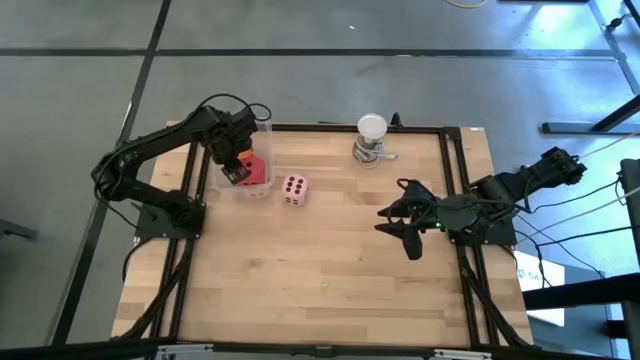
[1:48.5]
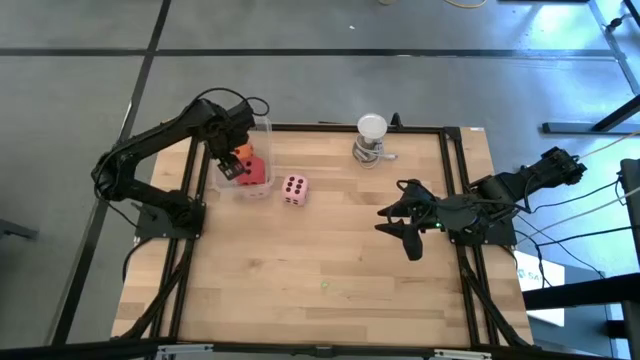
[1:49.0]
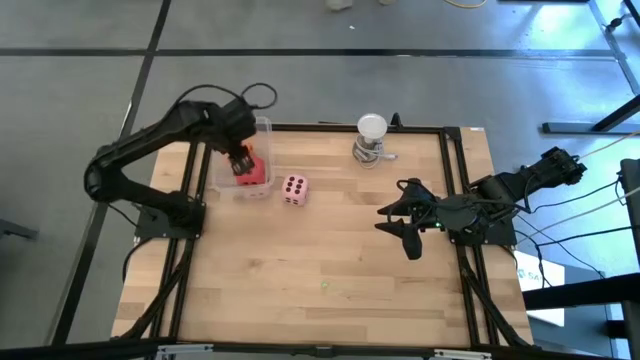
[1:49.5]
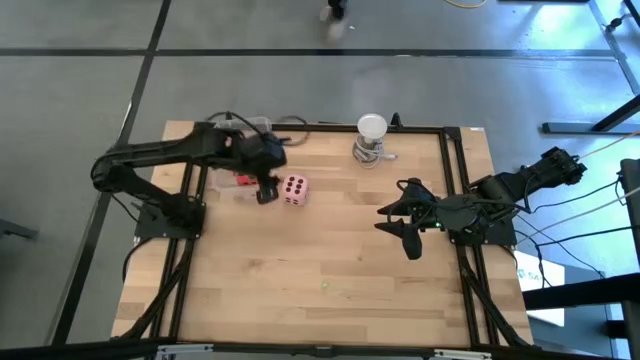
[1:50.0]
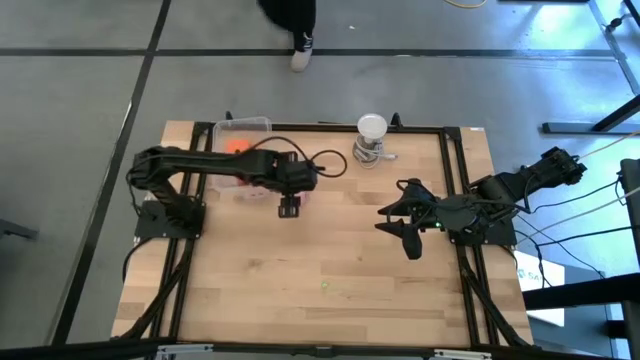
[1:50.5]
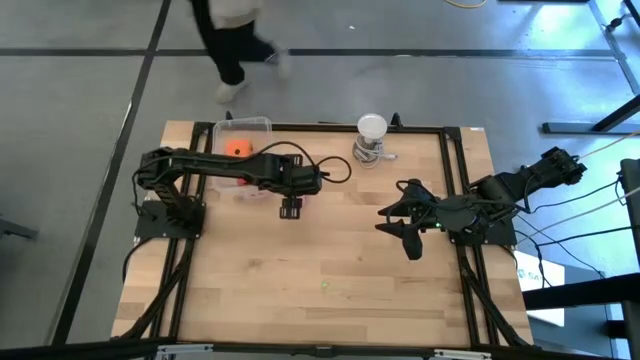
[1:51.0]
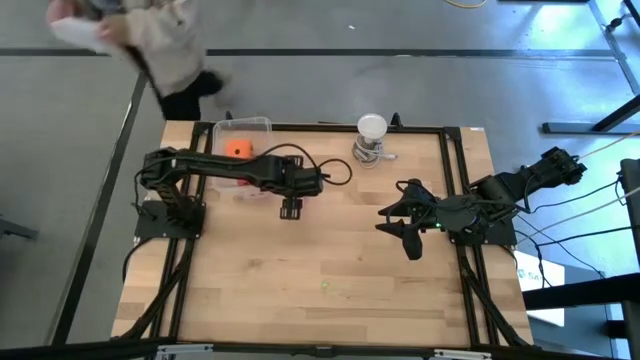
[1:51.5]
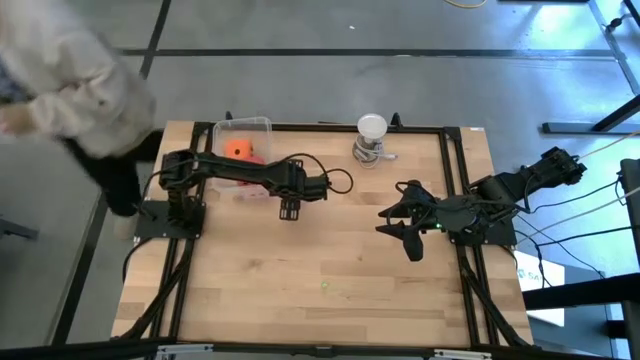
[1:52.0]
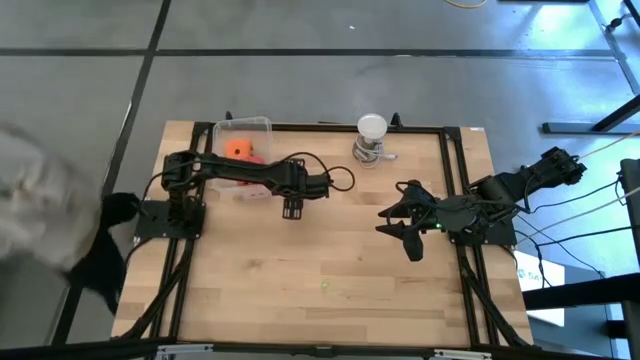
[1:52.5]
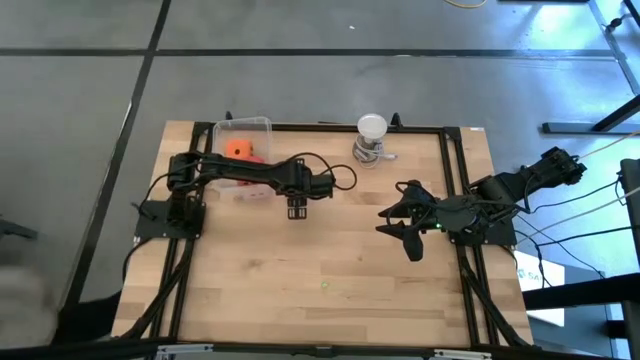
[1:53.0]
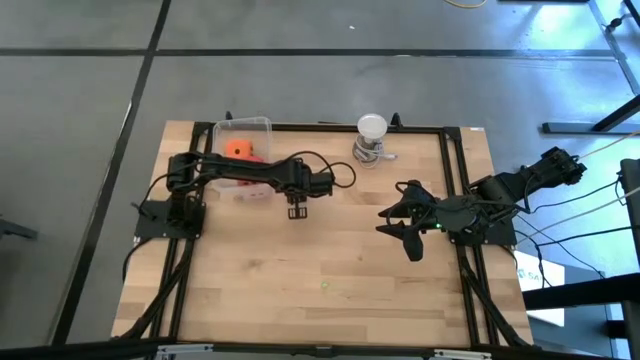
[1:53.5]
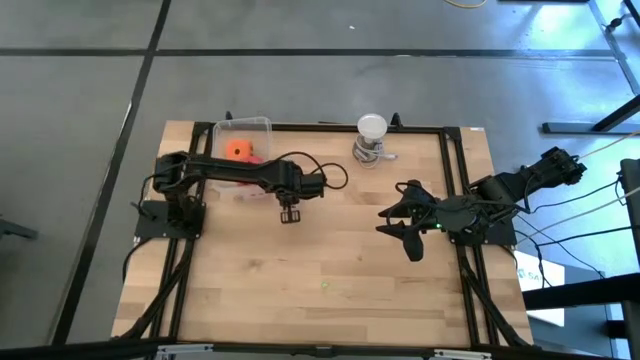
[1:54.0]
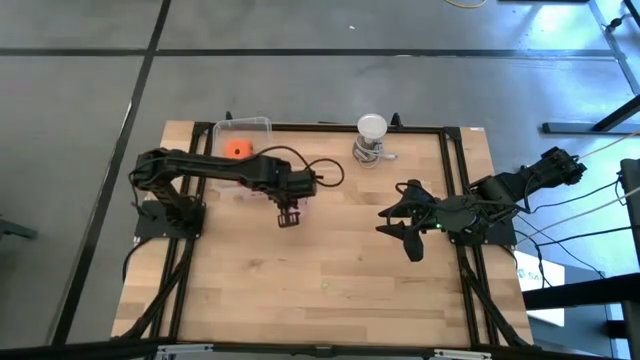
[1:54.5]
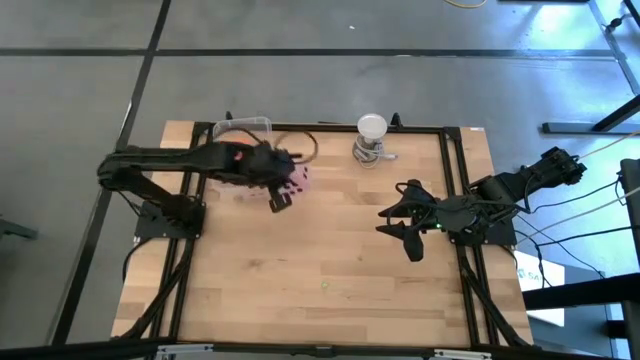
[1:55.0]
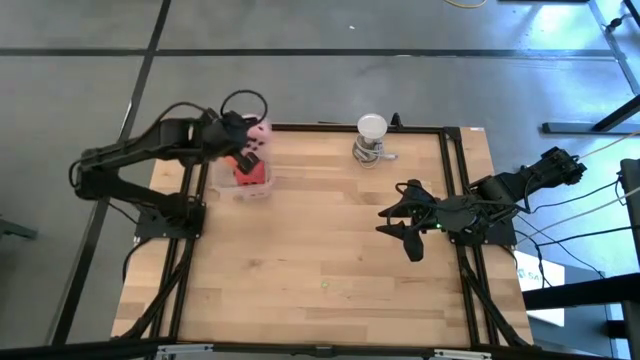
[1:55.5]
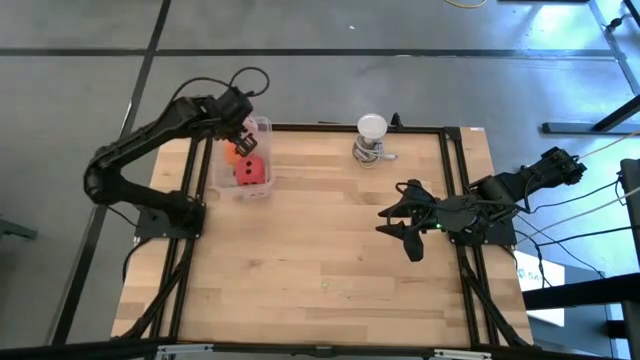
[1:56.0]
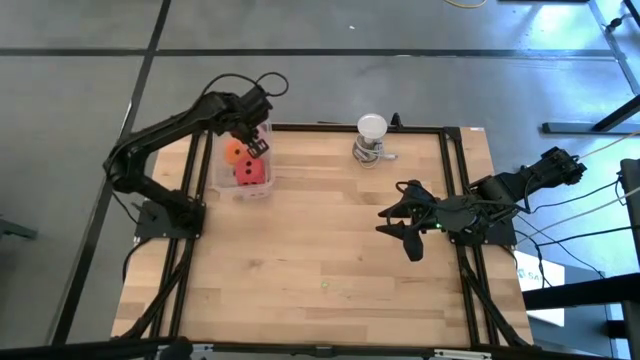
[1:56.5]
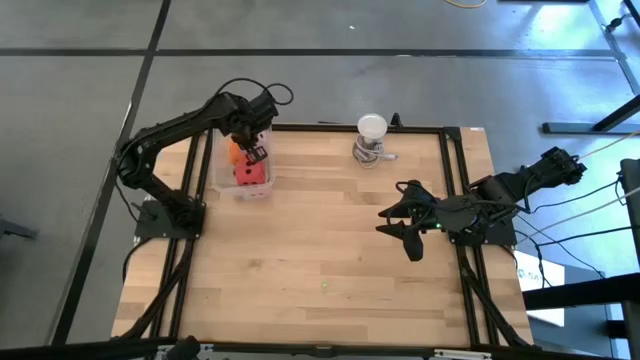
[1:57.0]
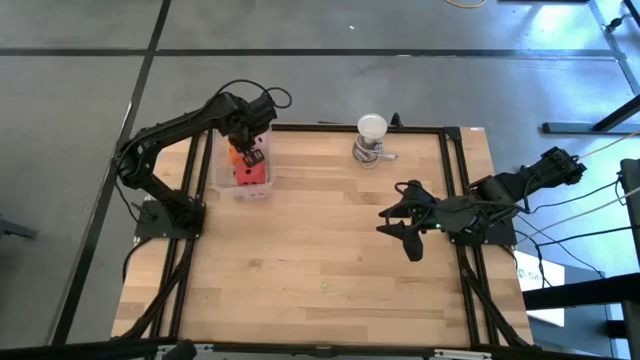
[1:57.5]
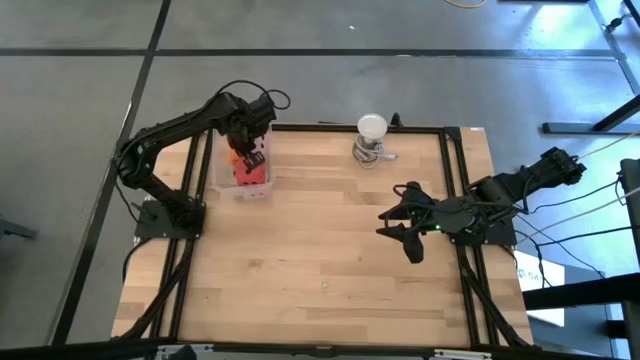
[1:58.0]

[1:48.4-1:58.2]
Task: Pick & Place Dice
Put the large pink dice into the transparent bin

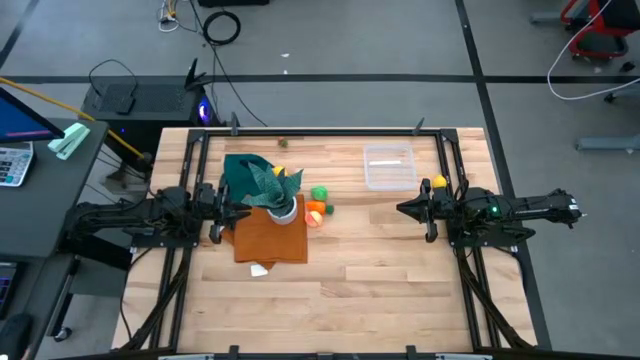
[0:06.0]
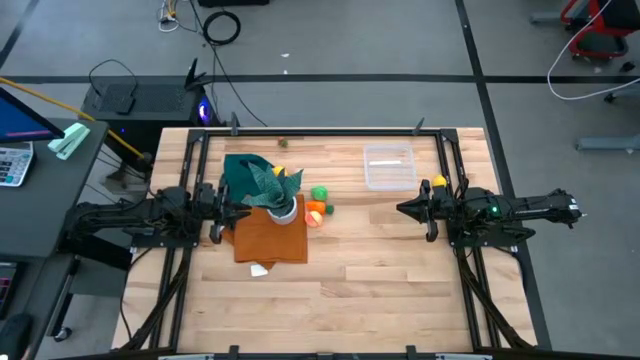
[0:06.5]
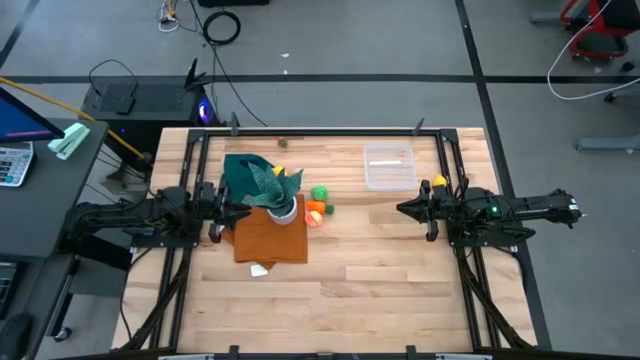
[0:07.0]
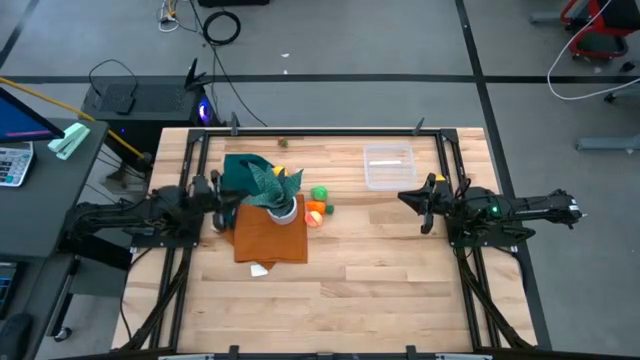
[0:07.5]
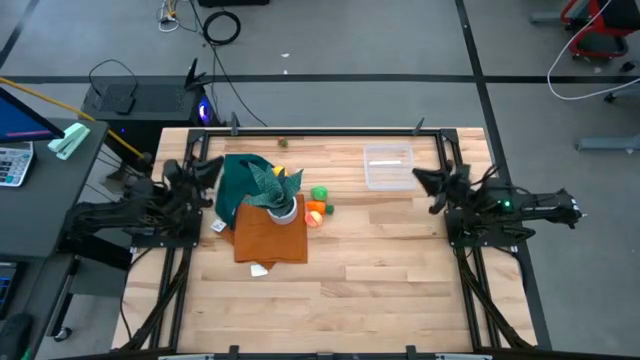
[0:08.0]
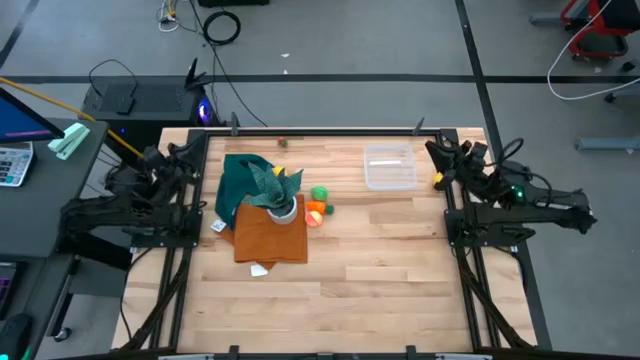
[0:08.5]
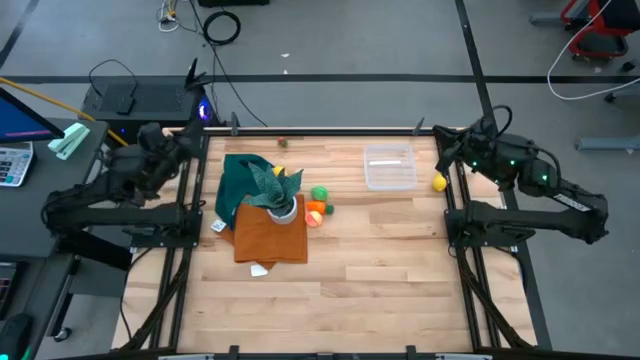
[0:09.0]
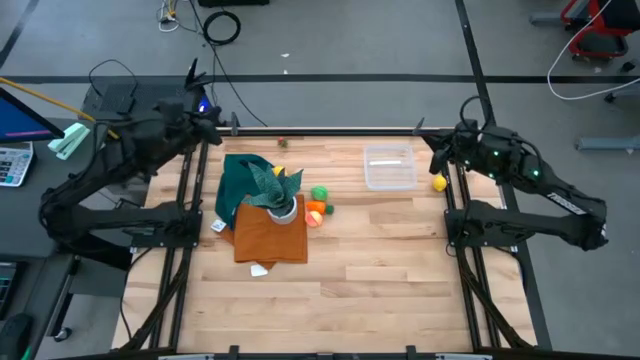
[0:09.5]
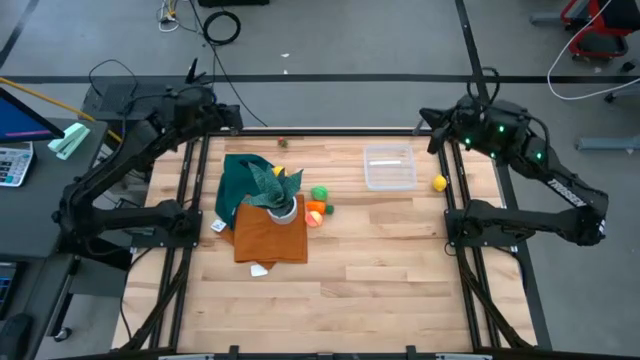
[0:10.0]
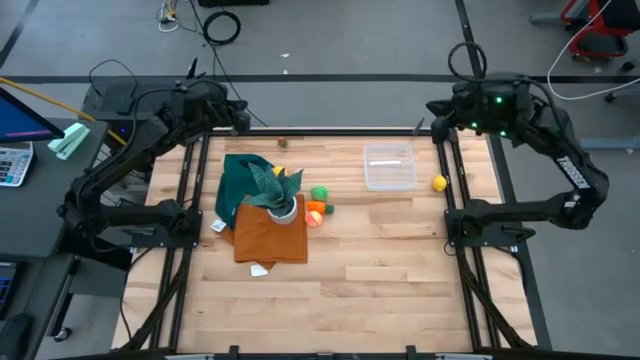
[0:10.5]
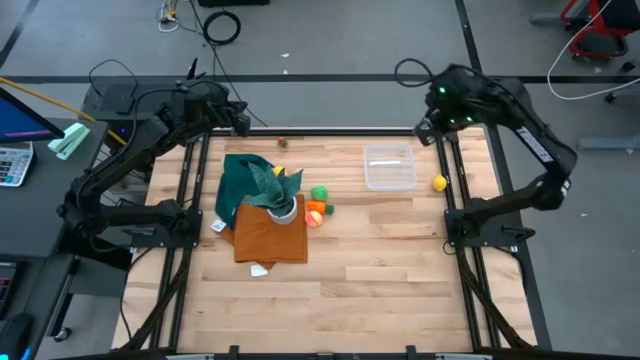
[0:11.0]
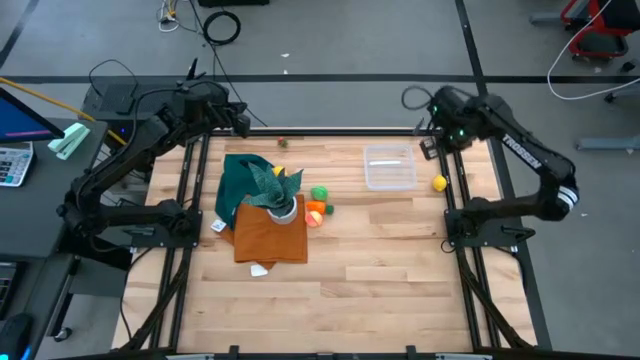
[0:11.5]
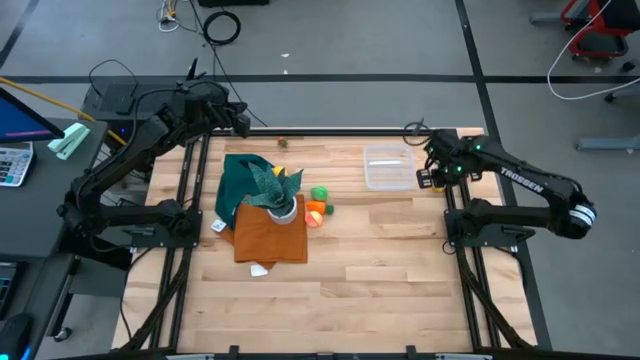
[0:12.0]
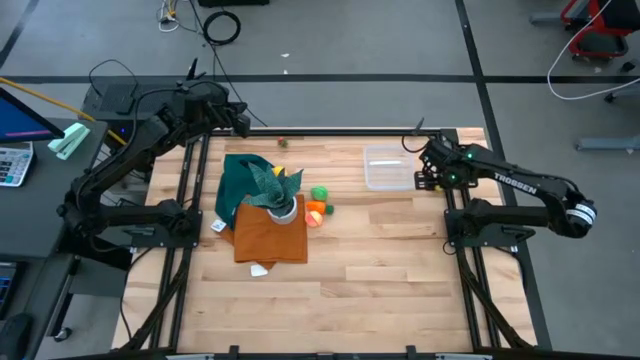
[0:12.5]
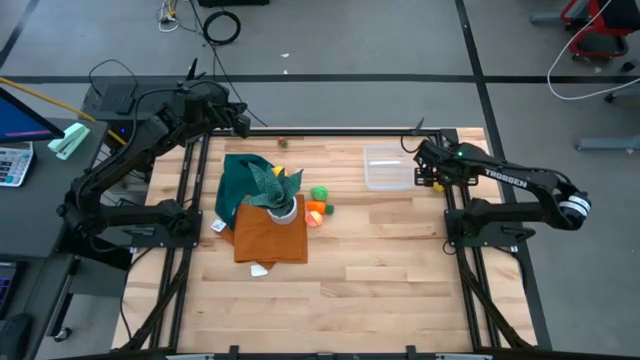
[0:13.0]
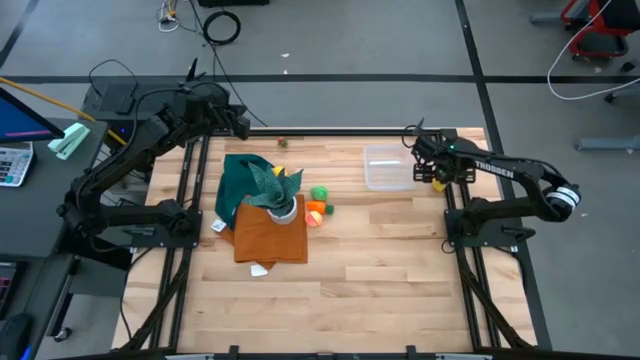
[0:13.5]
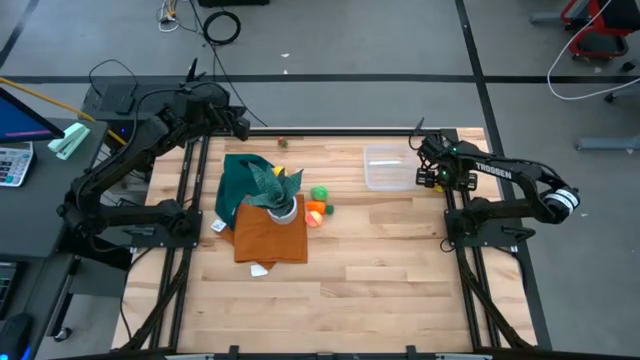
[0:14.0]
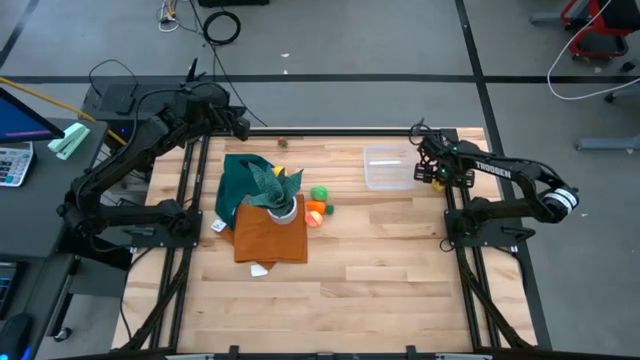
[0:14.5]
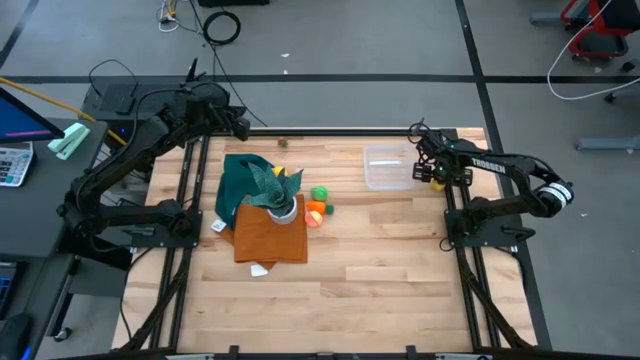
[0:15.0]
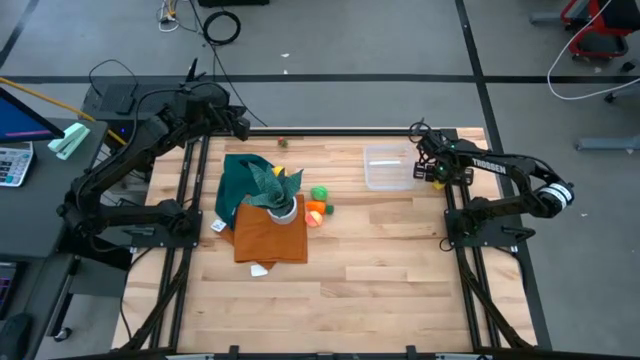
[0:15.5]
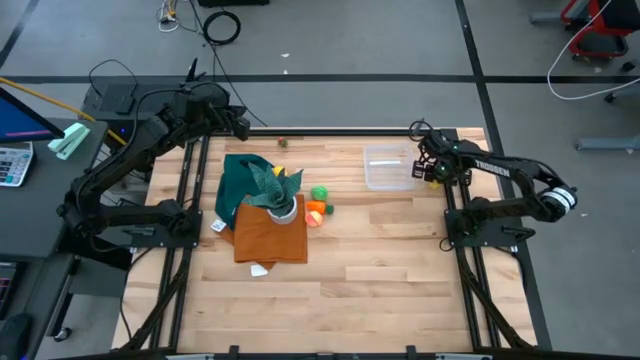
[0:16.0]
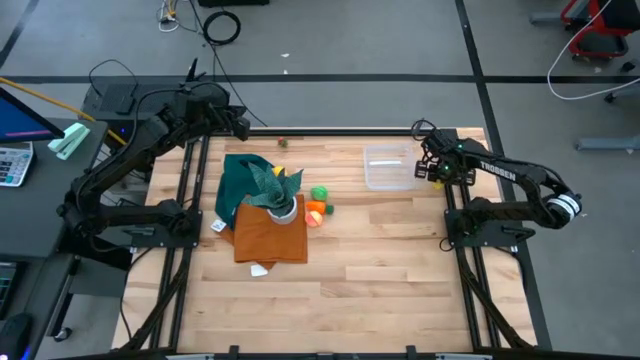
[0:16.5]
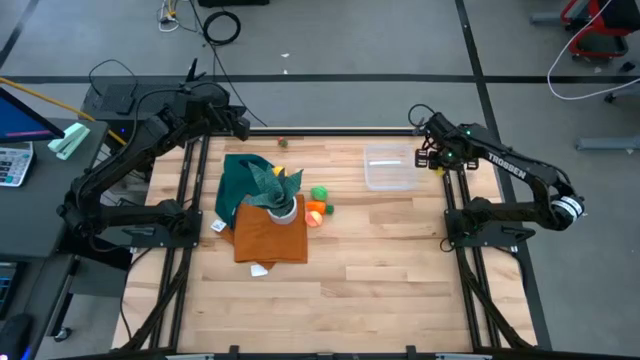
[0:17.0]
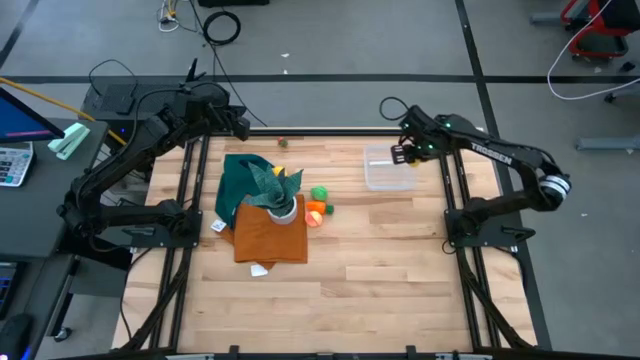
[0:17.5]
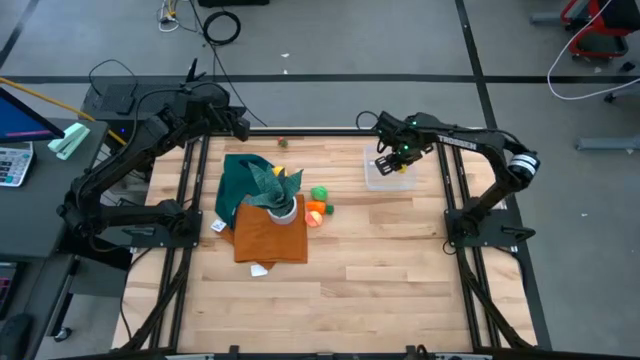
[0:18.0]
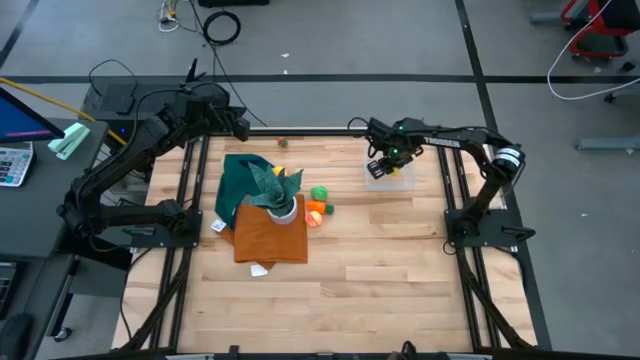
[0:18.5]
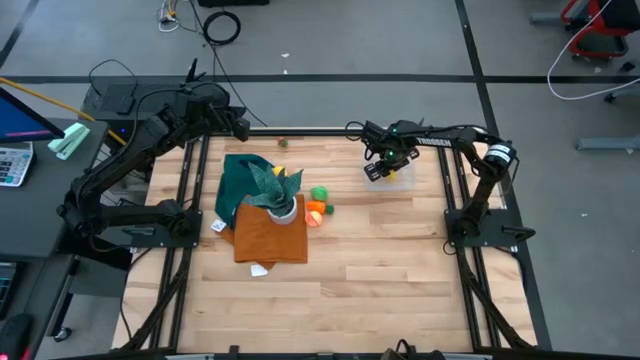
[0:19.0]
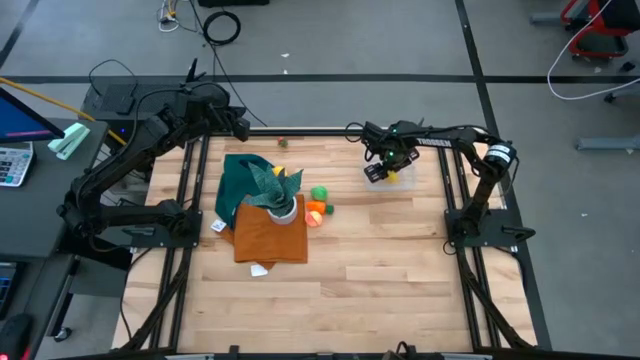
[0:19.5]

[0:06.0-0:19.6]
Task: Pick and placing Produce into tupperware
Put the right lemon into the transparent bin
